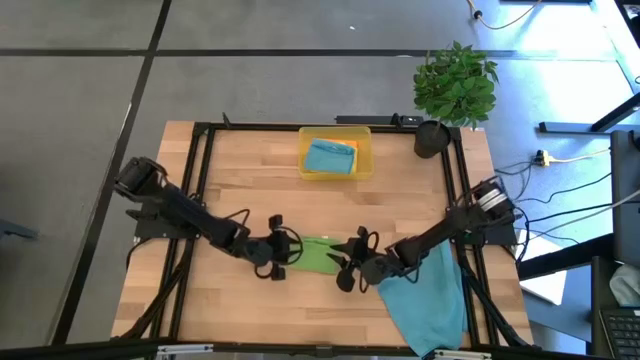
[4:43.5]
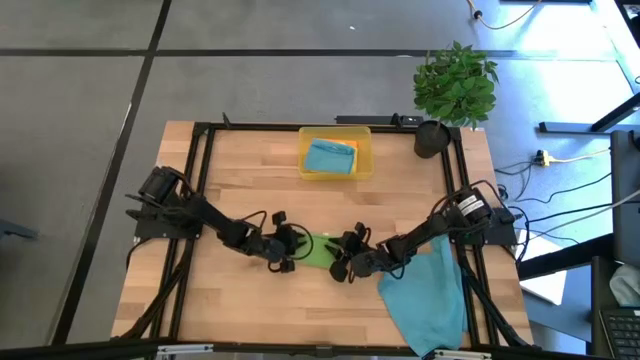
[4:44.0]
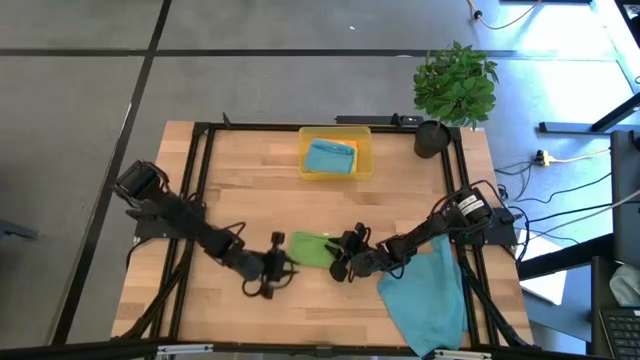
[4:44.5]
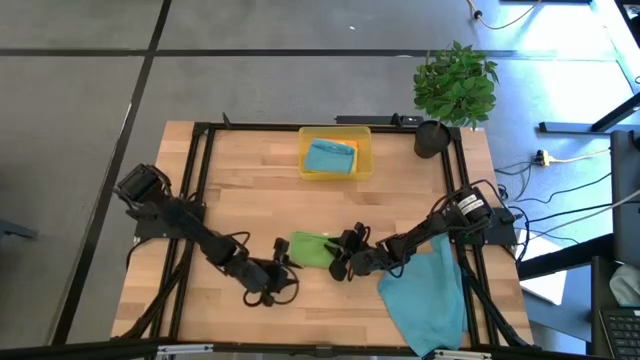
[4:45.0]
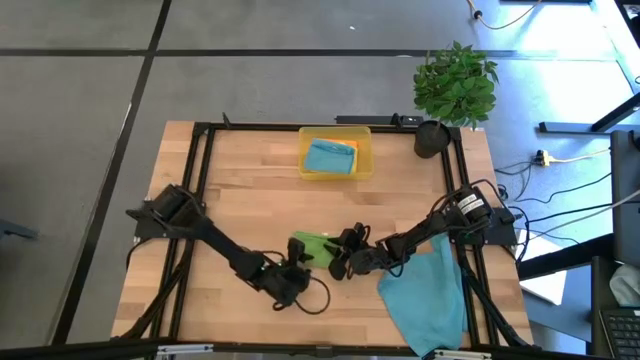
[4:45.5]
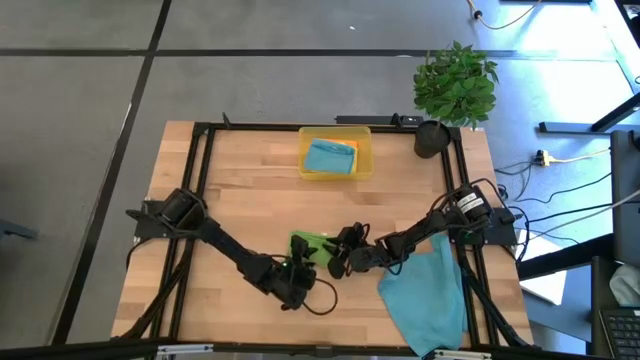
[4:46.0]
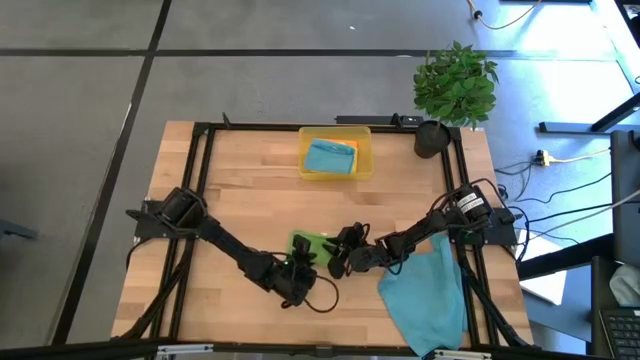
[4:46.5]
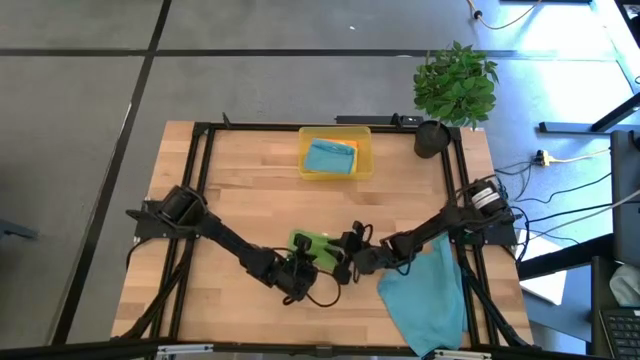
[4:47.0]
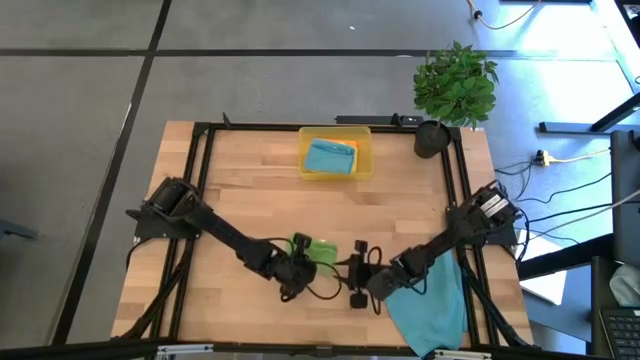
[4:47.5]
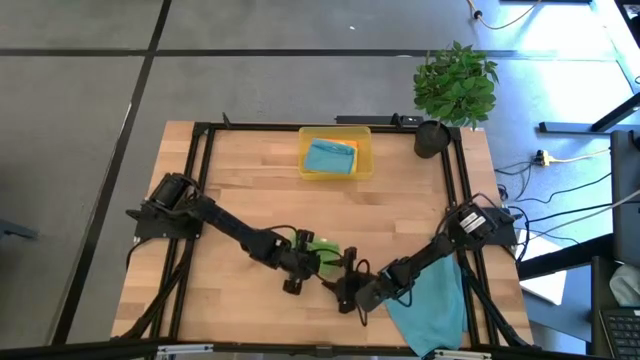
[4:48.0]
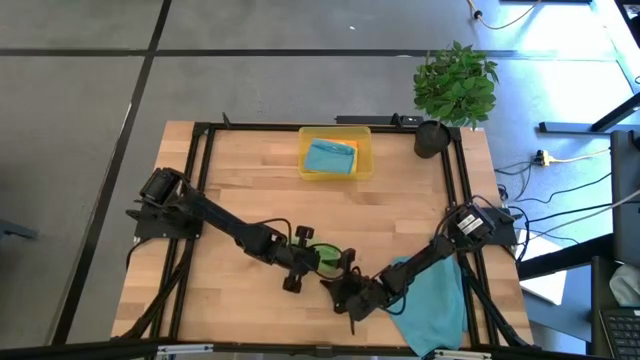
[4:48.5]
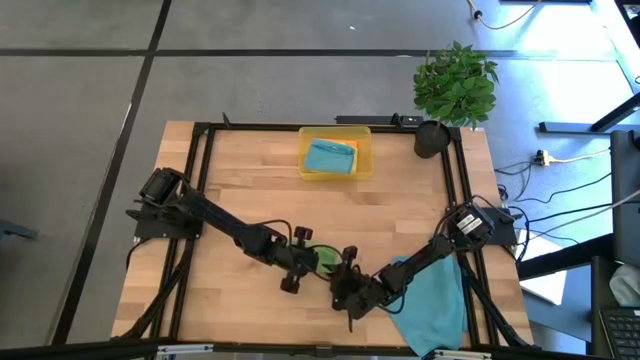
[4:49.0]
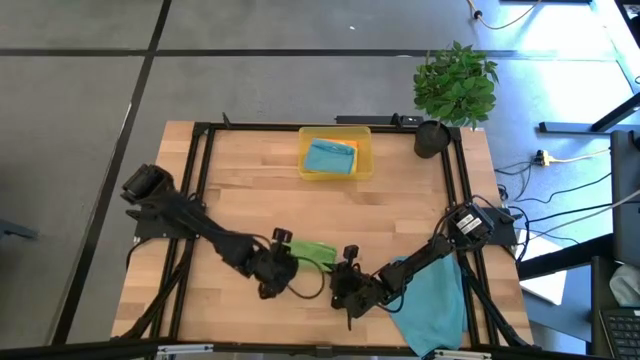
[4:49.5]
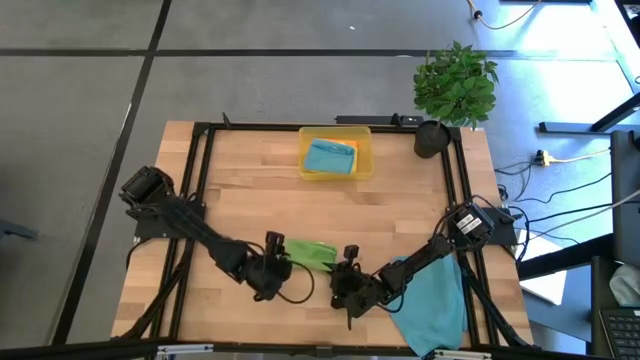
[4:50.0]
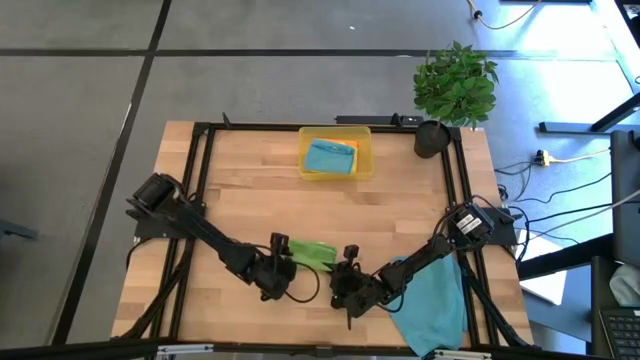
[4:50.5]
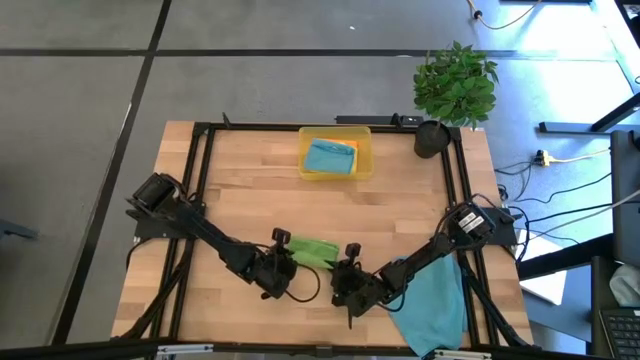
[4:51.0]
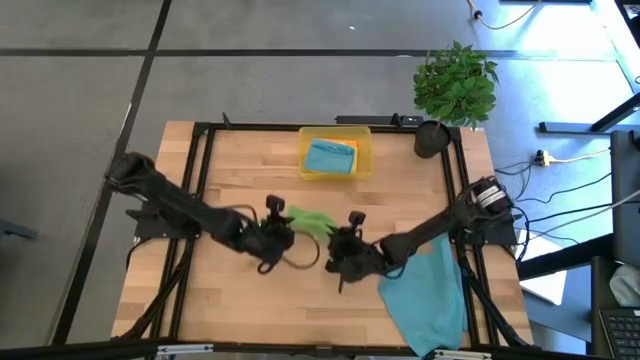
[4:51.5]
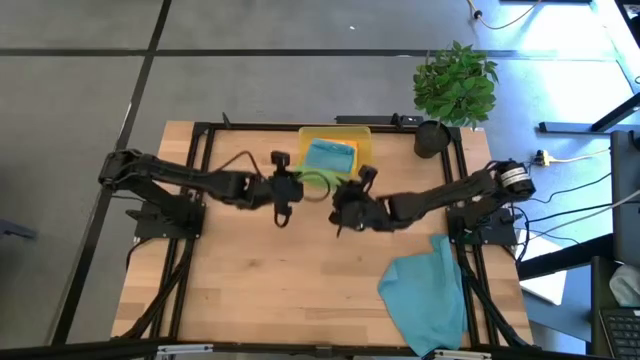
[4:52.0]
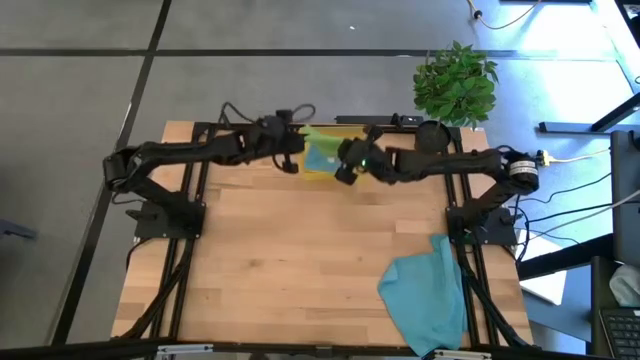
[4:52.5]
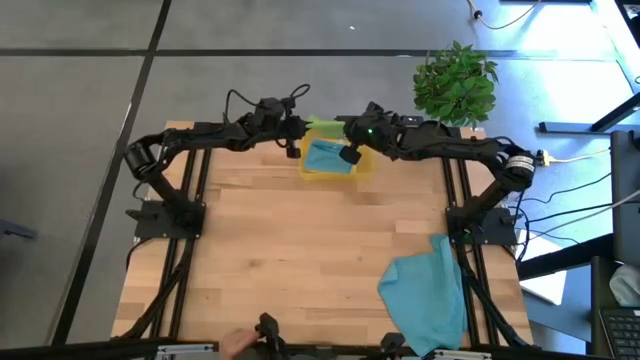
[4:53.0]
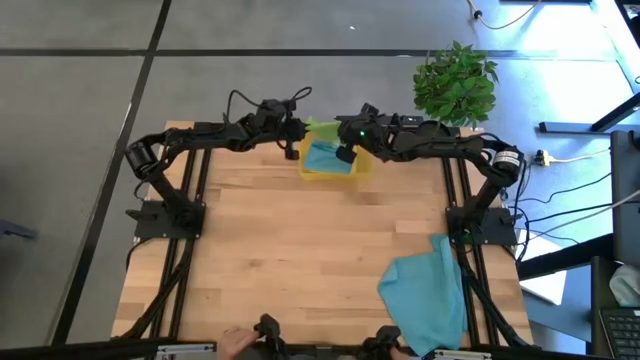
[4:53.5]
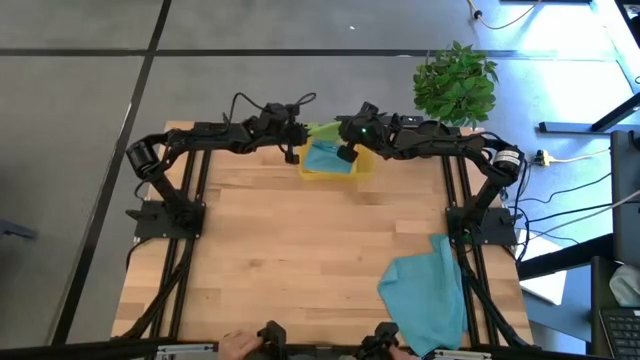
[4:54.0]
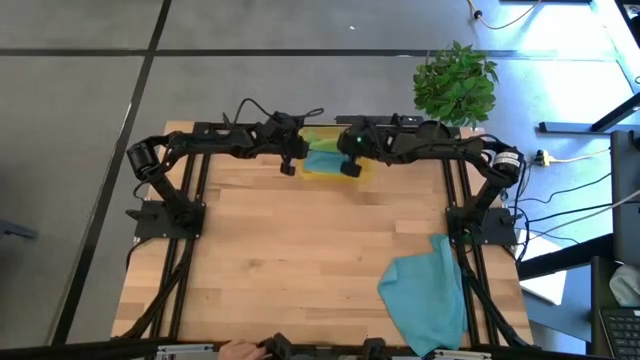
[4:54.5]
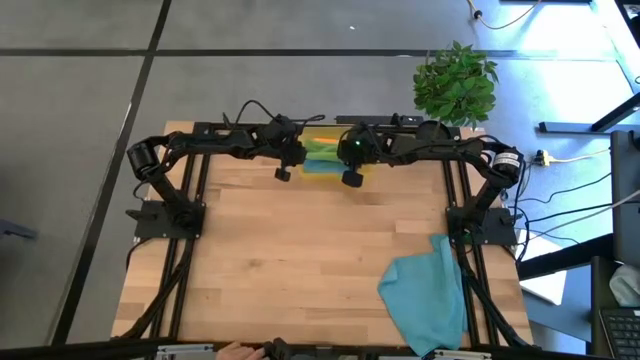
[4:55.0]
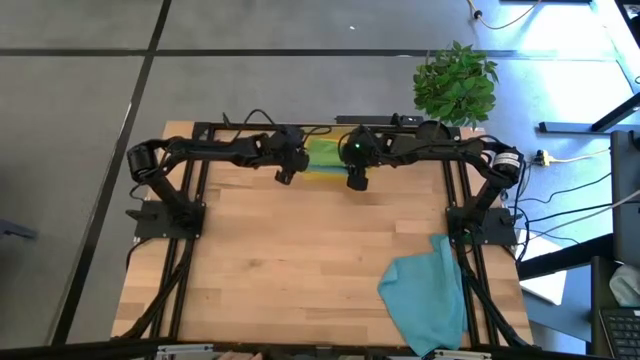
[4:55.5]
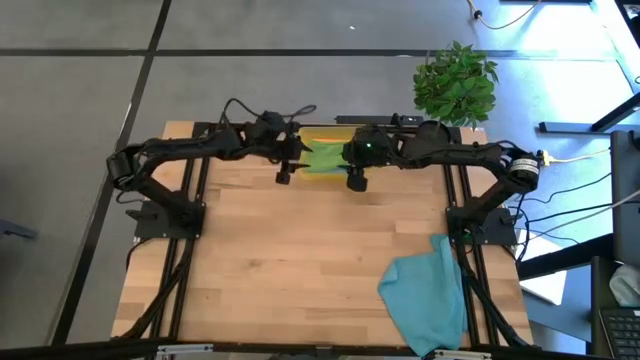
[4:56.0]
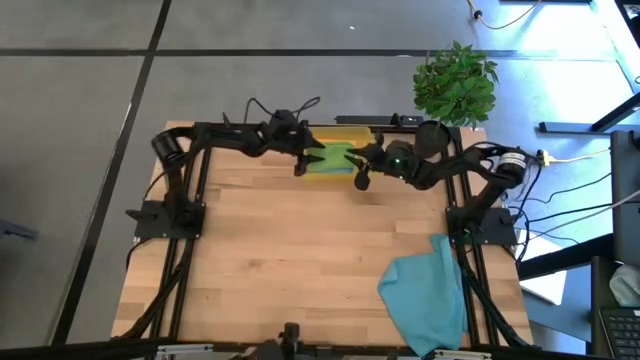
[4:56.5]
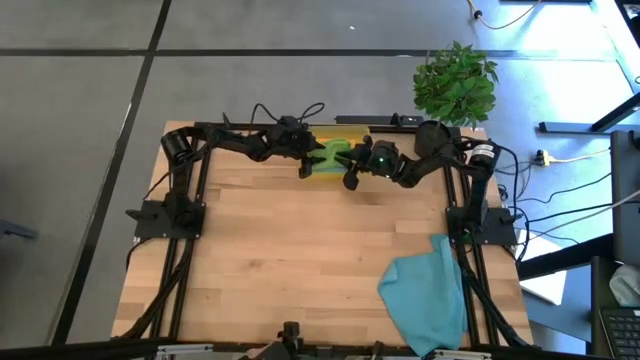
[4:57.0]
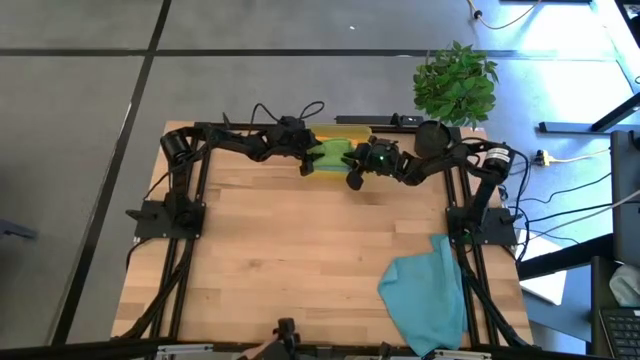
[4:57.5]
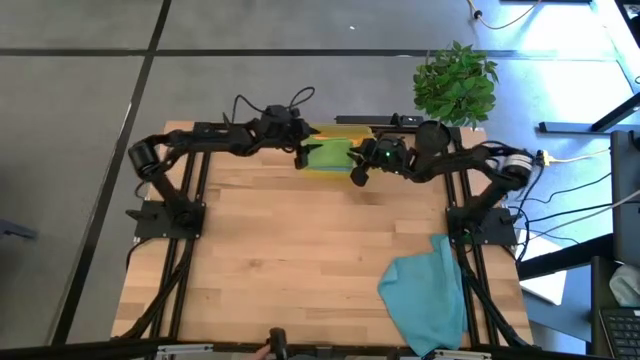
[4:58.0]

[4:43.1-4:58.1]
Task: Fold microfiber towels
Put the folded green microfiber cloth into the yellow bin

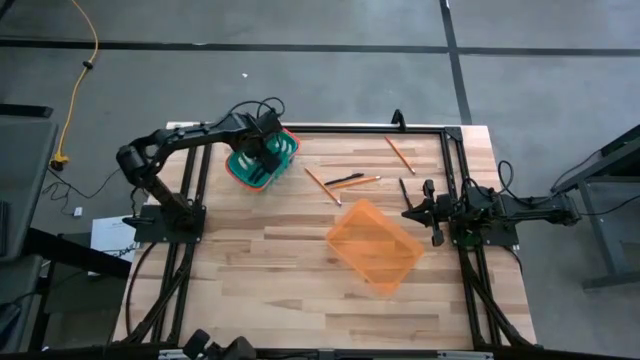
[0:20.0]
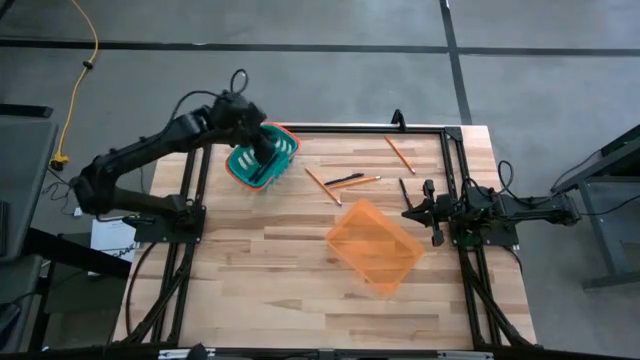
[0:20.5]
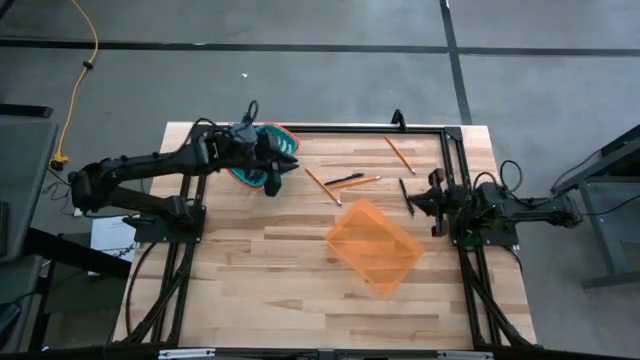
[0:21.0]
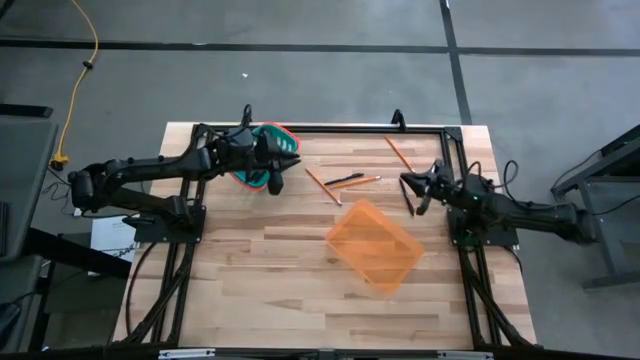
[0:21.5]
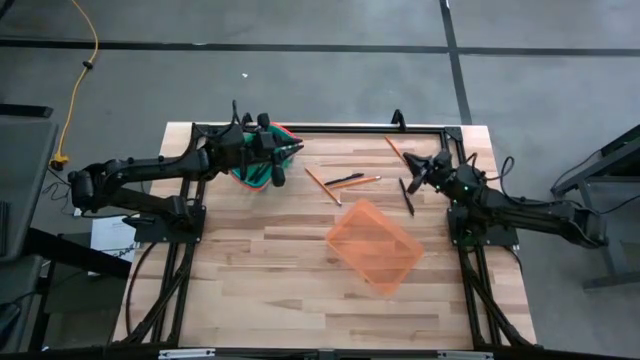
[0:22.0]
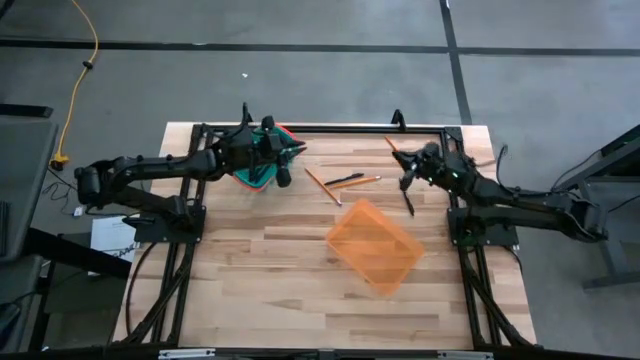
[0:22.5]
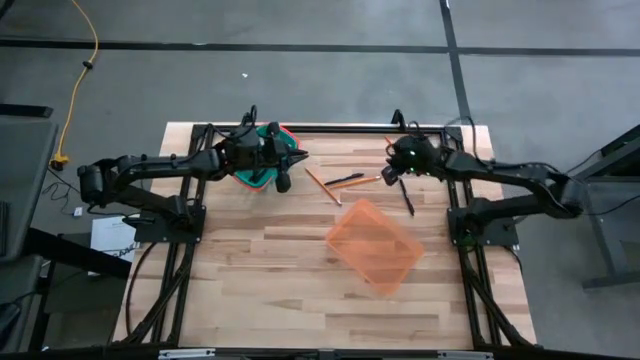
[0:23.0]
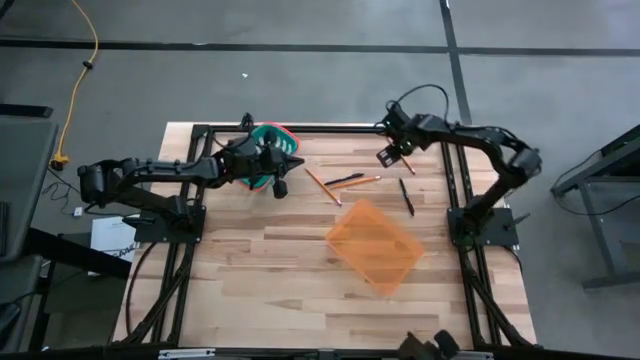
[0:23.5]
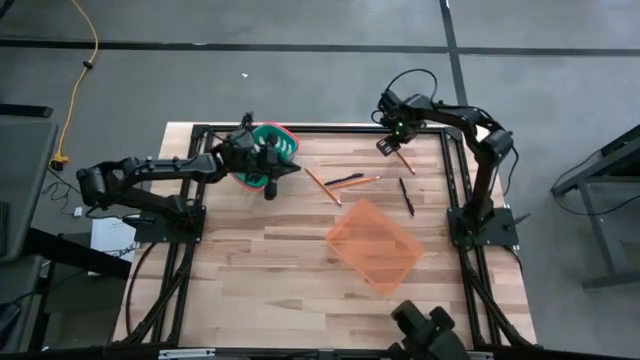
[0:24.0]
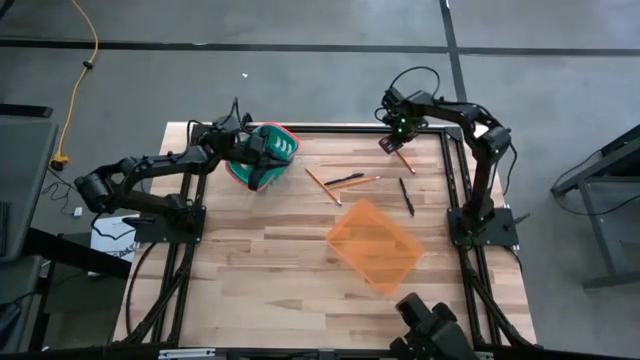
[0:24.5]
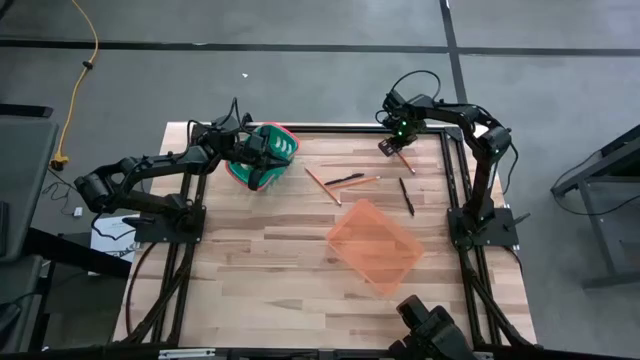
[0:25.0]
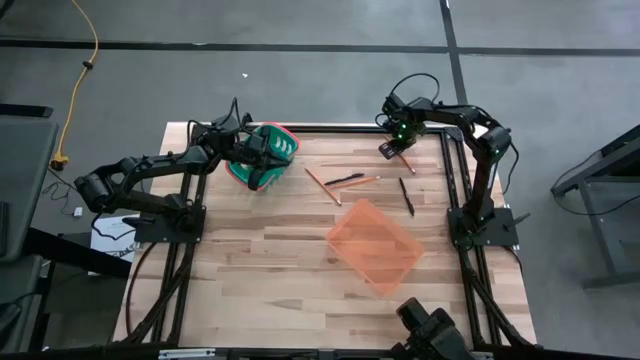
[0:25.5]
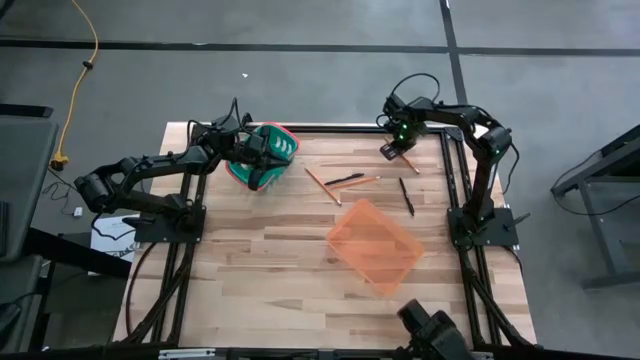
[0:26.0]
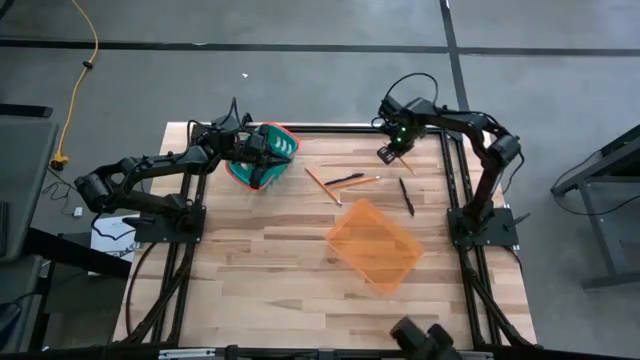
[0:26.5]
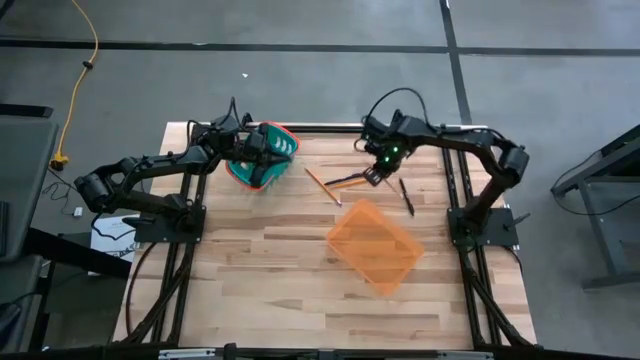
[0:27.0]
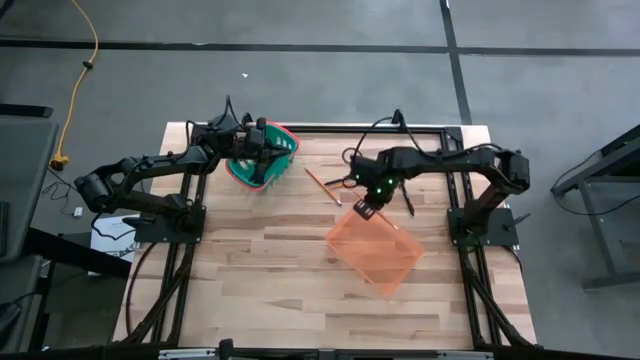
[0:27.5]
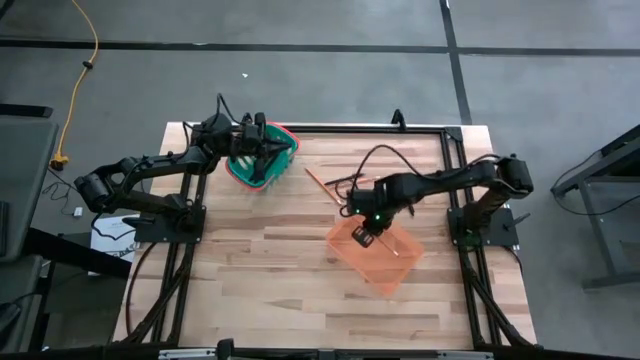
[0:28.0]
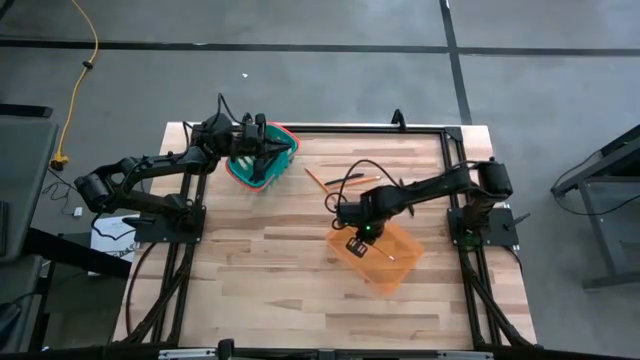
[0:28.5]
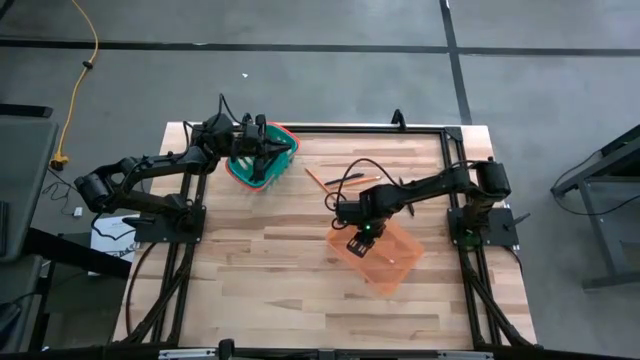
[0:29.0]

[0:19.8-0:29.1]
Task: Sort pens & pencils
Put the orange pencil into the orange bin
